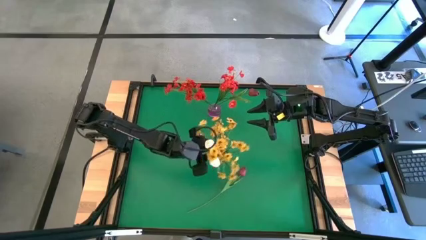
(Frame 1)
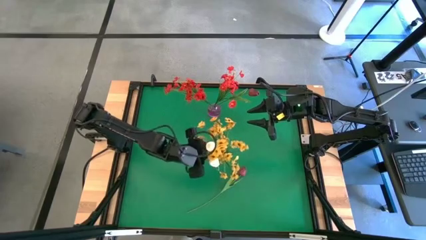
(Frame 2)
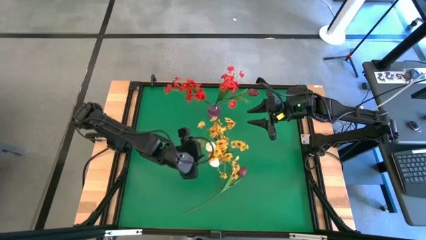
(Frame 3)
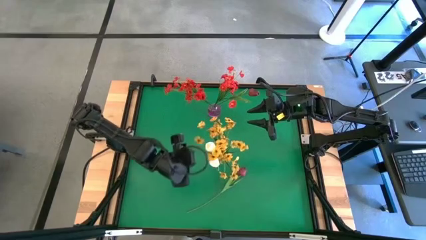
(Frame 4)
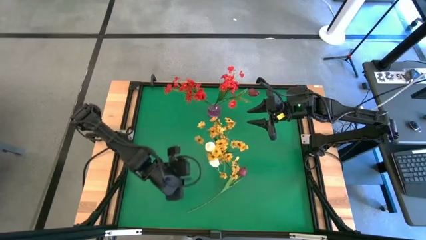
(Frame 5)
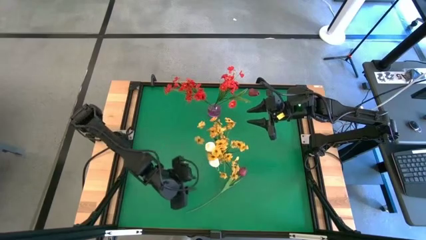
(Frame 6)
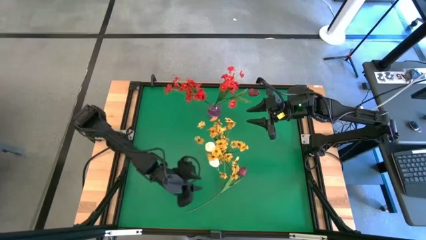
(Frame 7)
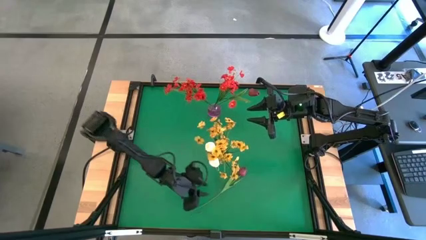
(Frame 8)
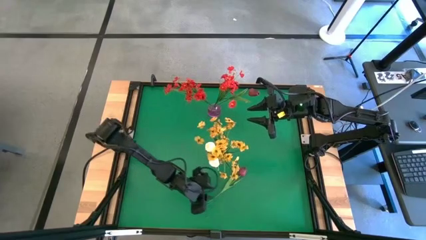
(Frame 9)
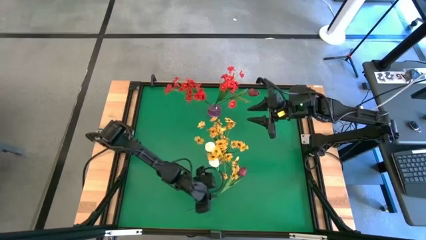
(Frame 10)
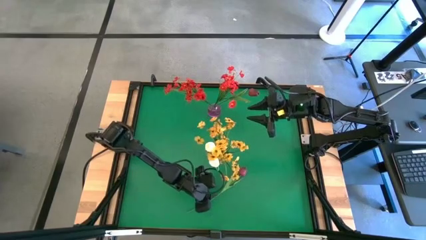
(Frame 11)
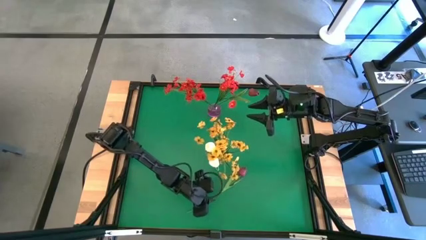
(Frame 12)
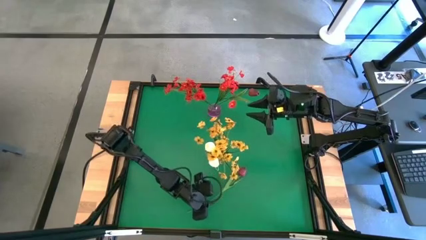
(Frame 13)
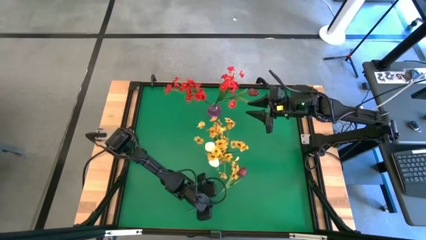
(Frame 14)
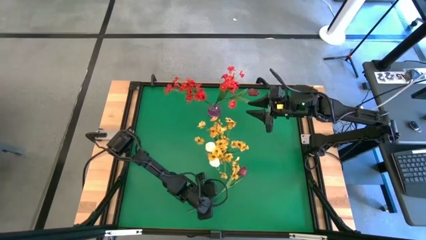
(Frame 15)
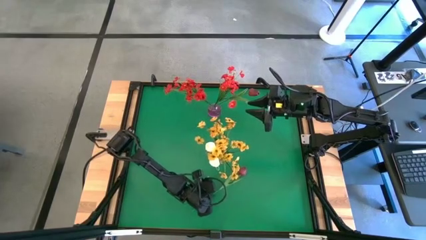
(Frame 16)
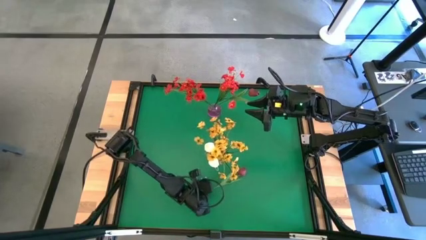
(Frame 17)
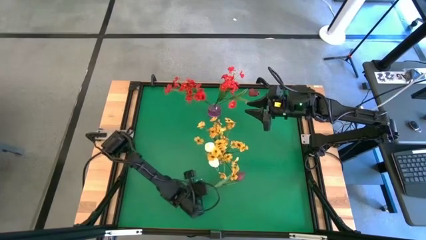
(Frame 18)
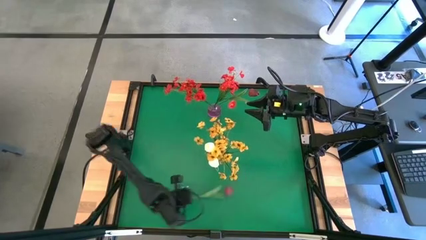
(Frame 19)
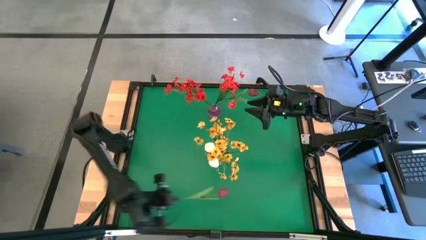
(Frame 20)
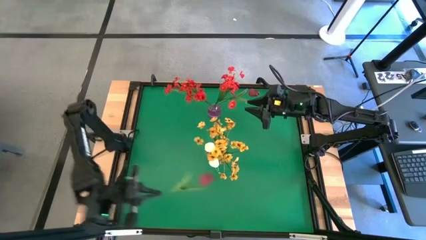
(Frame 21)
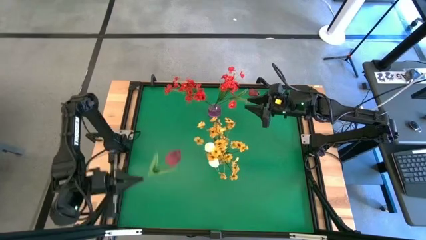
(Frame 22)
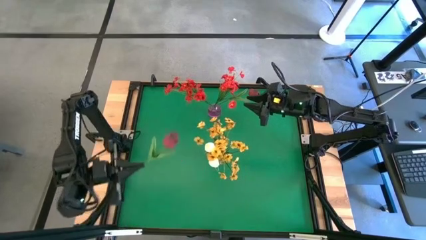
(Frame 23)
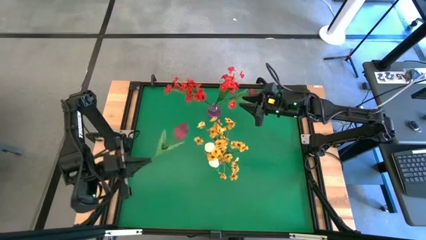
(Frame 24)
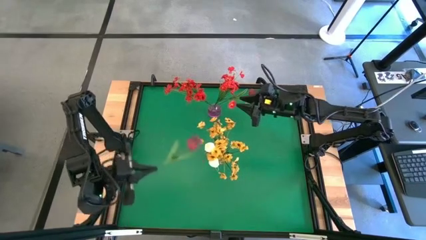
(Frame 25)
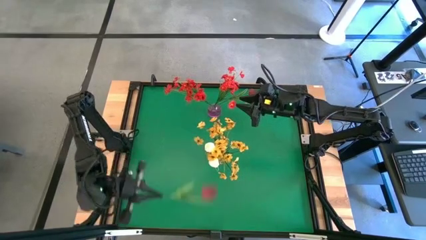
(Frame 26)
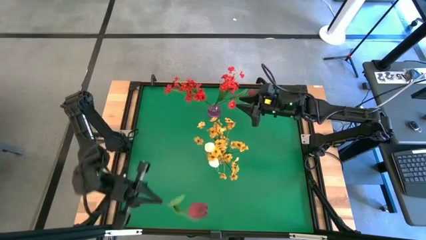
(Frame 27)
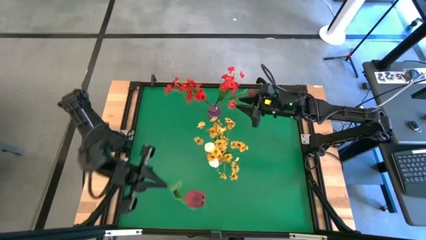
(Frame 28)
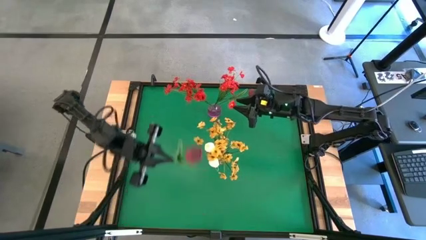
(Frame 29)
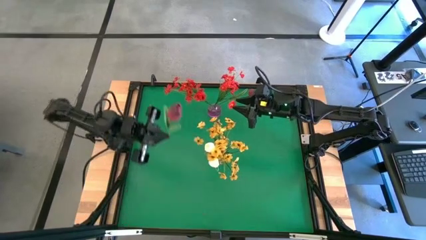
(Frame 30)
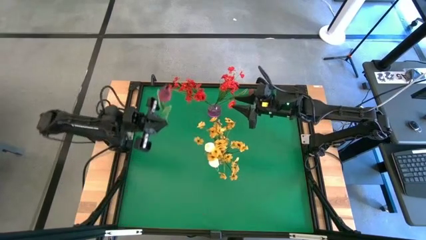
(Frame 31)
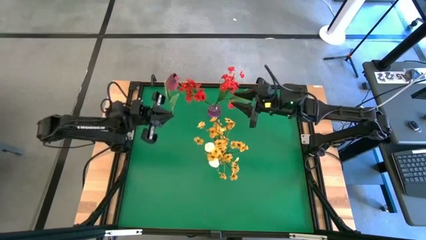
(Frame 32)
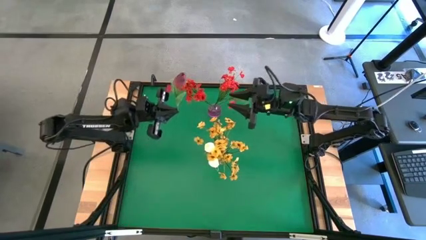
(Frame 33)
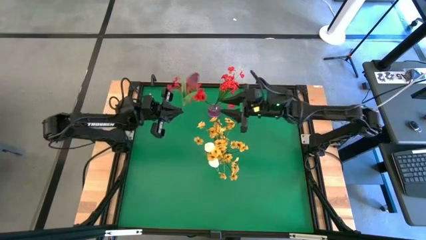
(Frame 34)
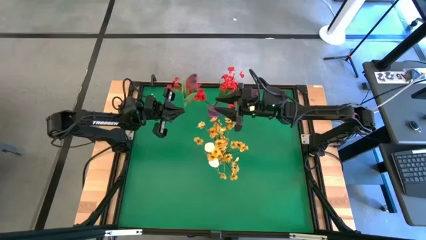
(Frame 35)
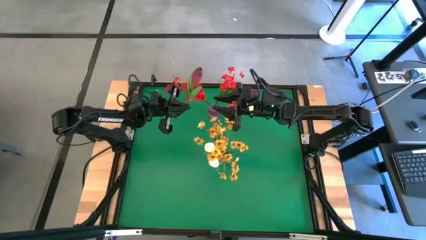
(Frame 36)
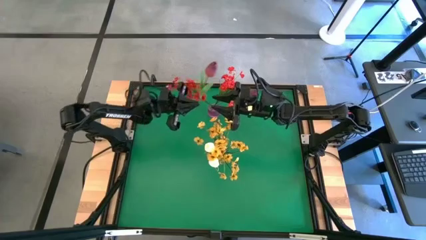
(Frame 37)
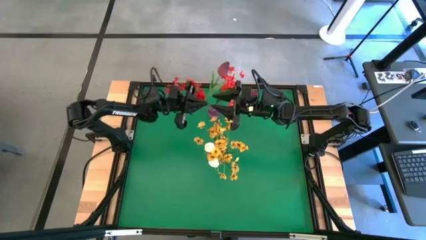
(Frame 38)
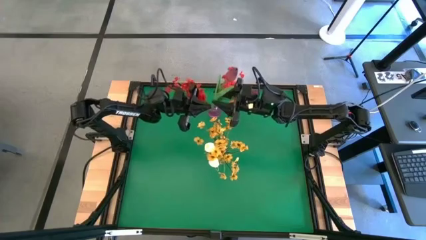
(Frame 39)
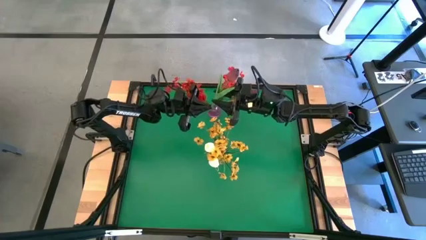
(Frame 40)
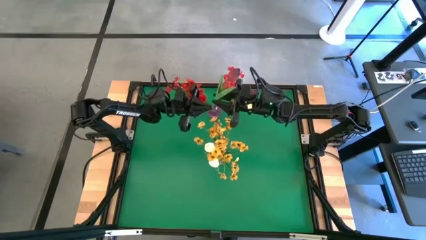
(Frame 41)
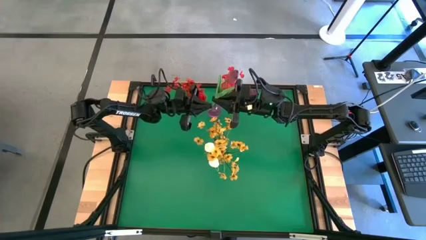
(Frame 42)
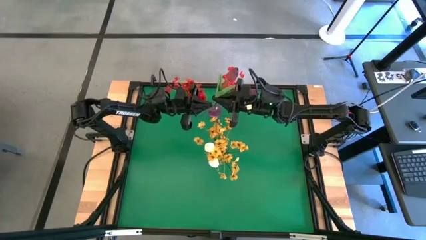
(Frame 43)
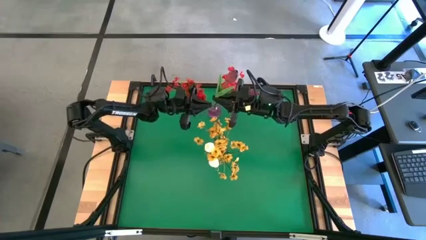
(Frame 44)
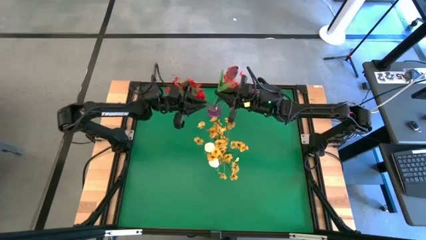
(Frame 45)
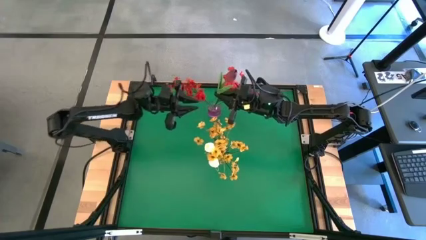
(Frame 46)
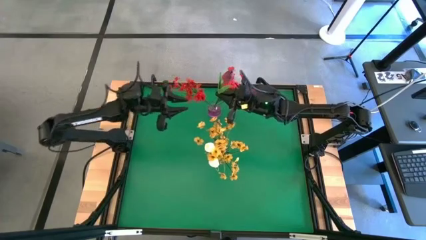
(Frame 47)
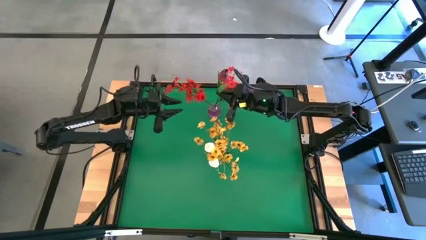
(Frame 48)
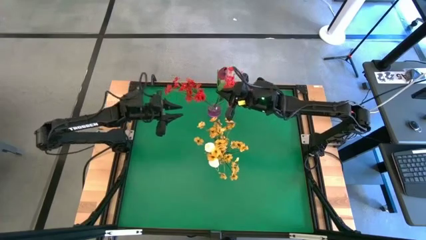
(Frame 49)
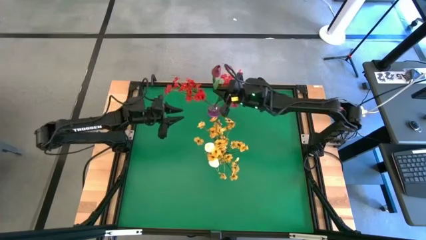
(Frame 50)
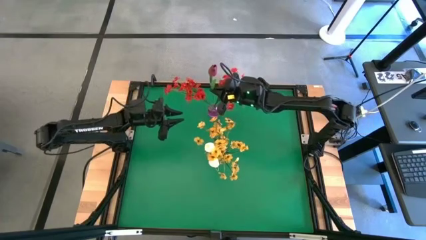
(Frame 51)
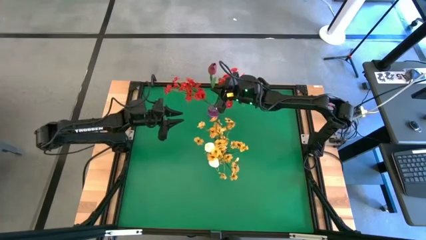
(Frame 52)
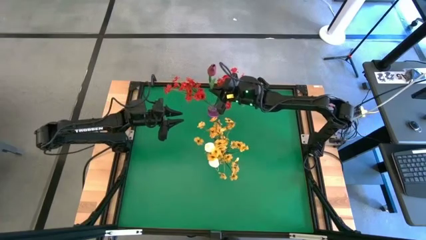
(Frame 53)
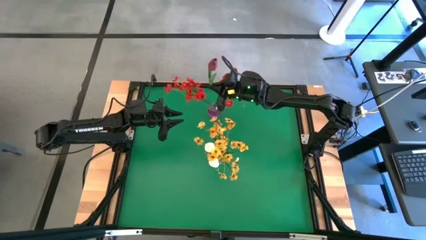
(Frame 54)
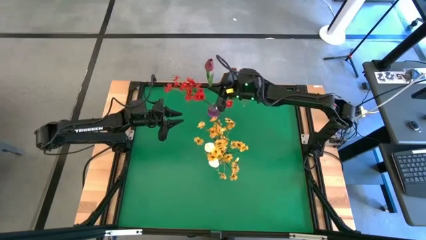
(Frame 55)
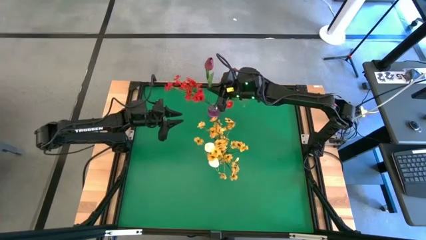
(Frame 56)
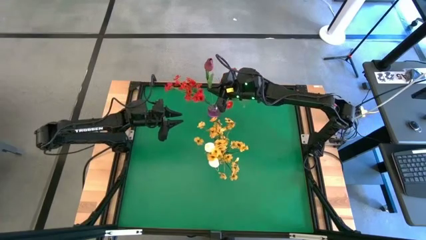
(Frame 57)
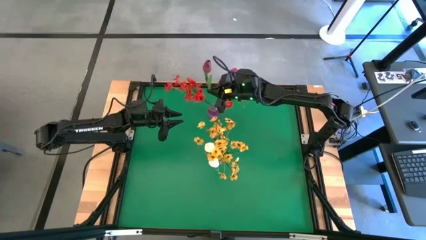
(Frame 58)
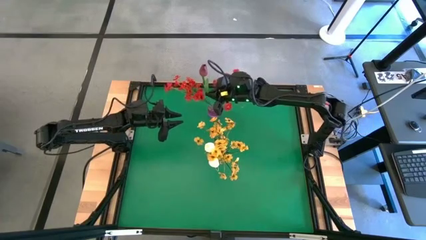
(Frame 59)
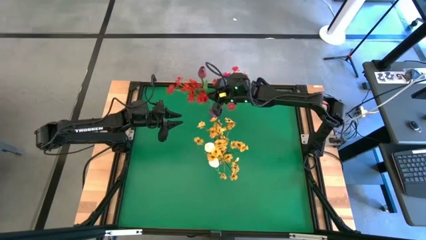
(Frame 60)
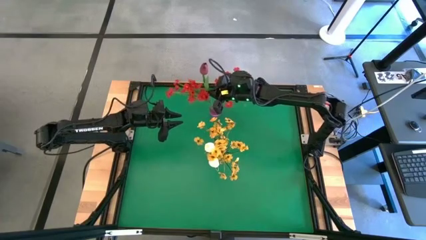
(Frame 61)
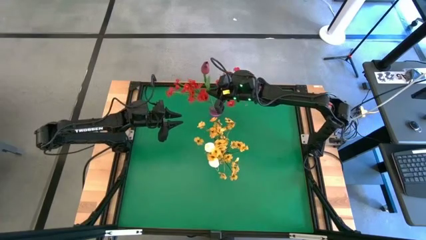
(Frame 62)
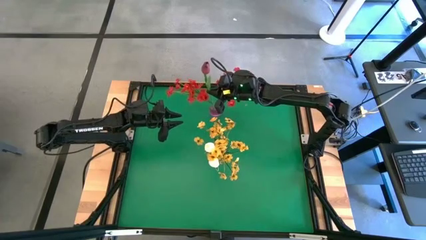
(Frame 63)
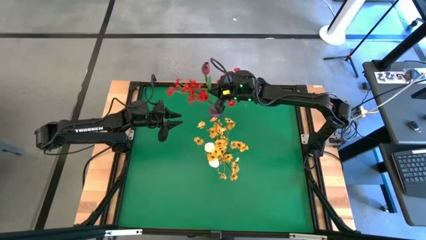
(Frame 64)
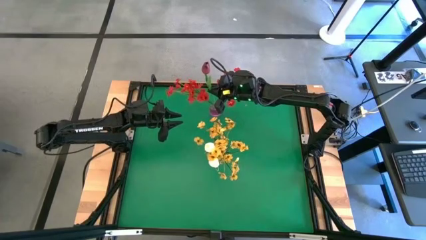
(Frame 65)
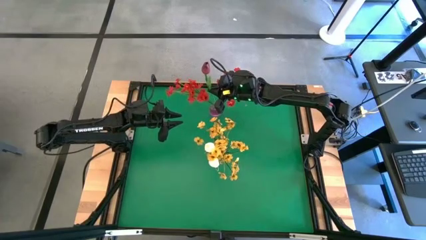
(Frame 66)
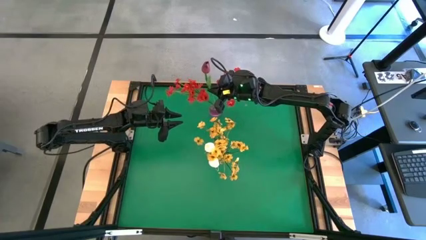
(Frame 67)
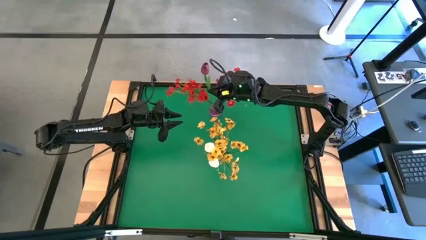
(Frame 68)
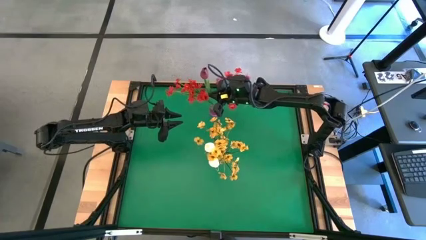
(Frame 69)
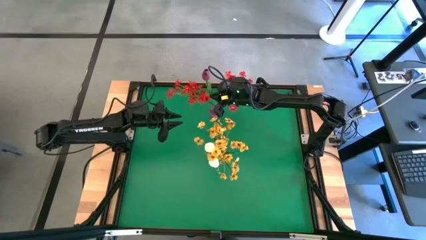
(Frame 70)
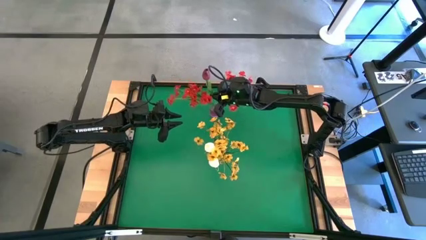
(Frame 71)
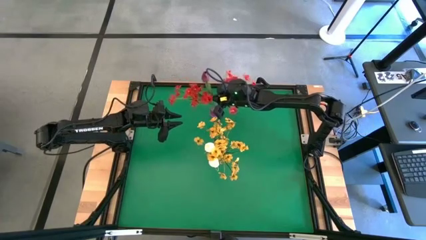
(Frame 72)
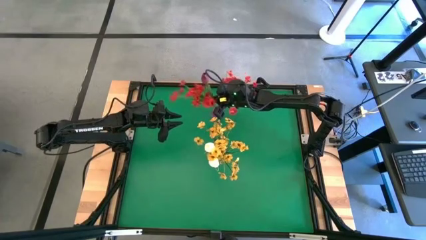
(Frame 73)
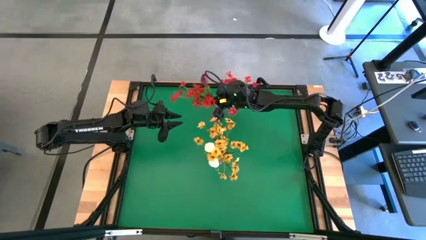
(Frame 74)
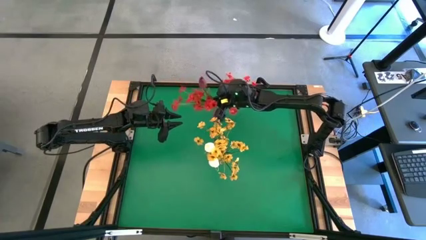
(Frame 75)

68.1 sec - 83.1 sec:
Task: Sort flowers into vase by color
Put the red tulip into the pink vase

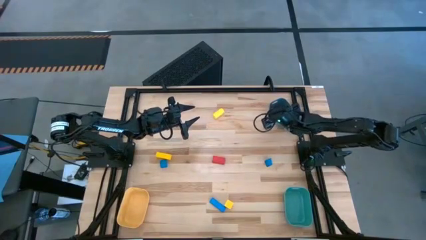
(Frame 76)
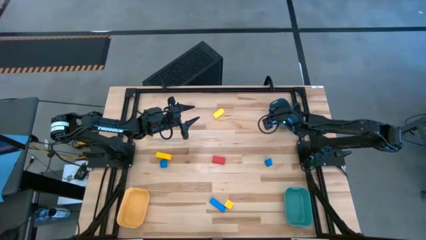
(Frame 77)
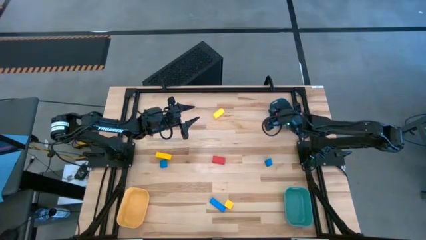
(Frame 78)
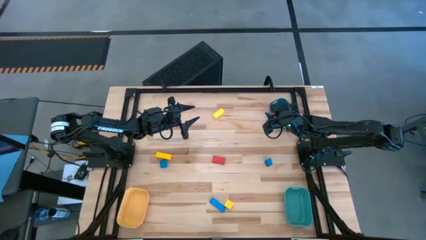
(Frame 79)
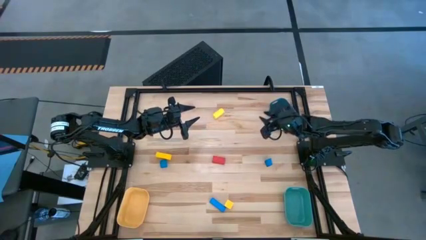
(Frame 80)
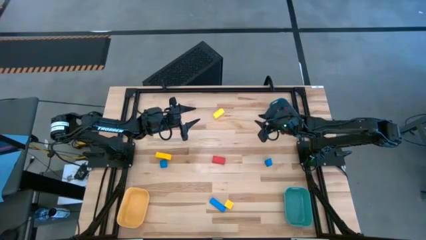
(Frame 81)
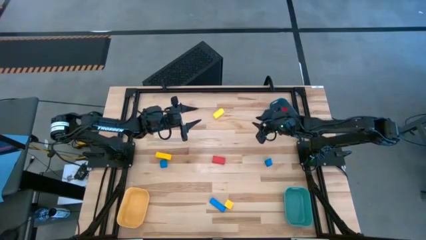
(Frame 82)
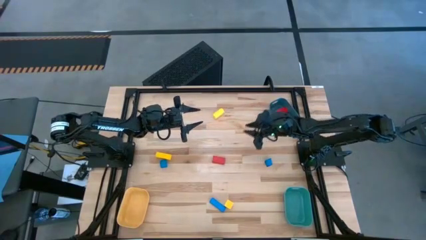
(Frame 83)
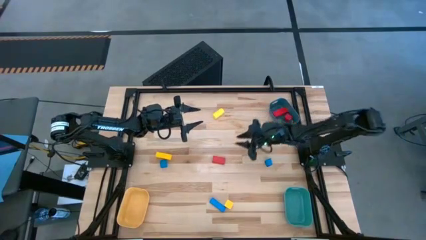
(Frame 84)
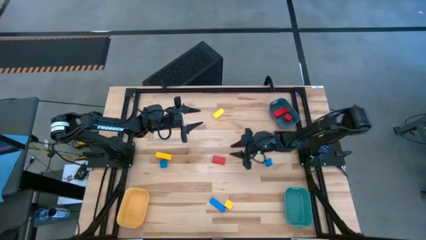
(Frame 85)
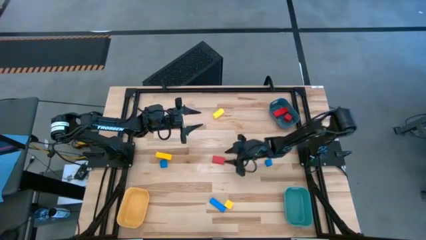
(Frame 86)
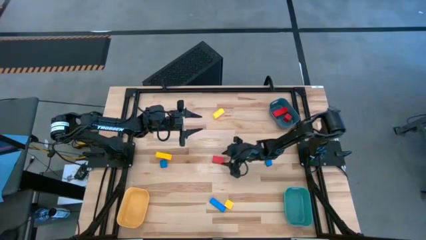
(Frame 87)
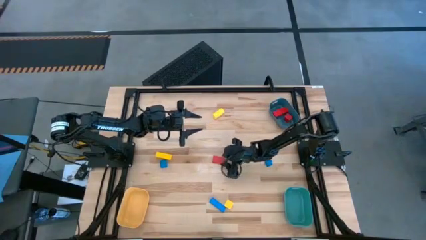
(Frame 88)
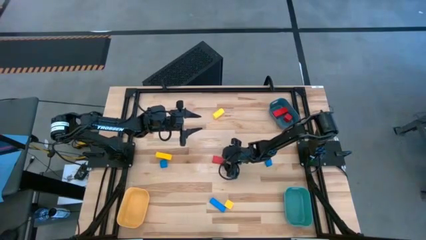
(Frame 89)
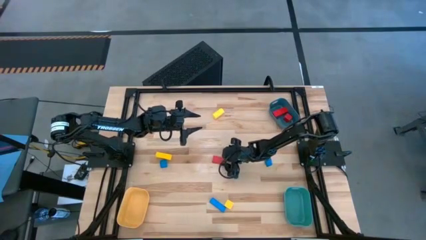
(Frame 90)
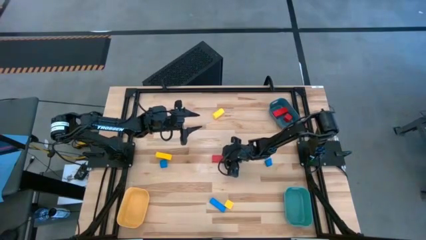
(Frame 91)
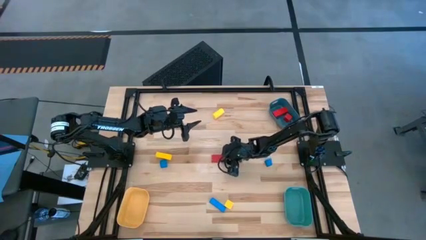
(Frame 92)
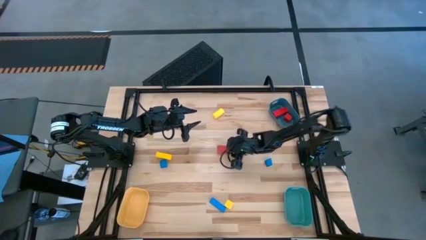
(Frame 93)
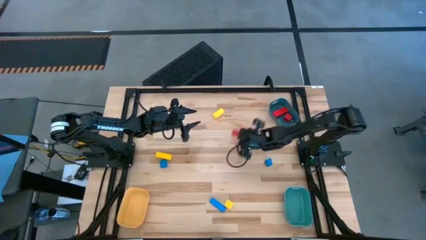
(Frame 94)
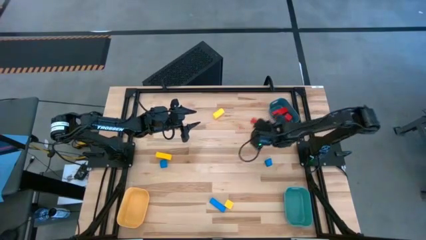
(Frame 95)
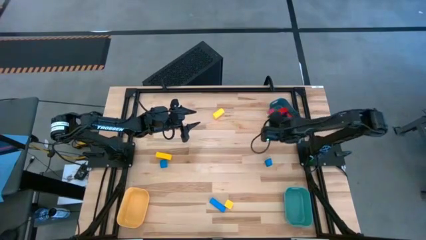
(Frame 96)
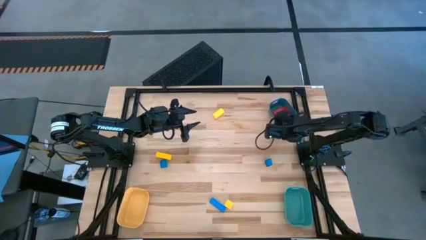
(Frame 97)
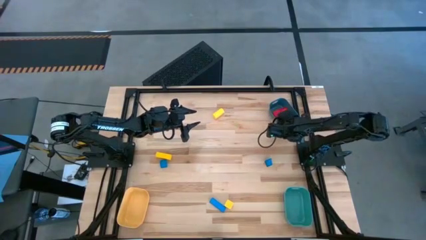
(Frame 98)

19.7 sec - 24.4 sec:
Task: Sort & place blocks by color
Put the red block into the blue bin
